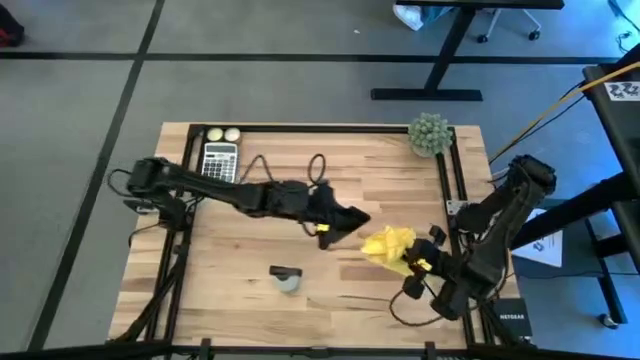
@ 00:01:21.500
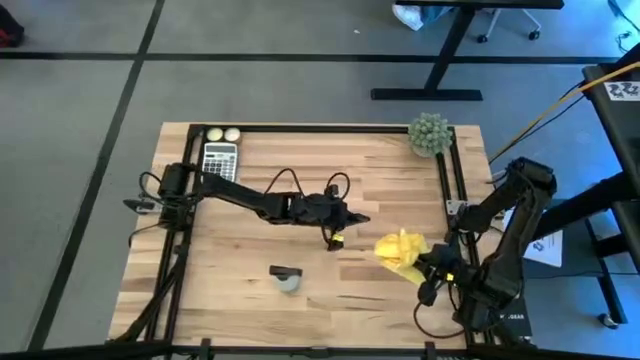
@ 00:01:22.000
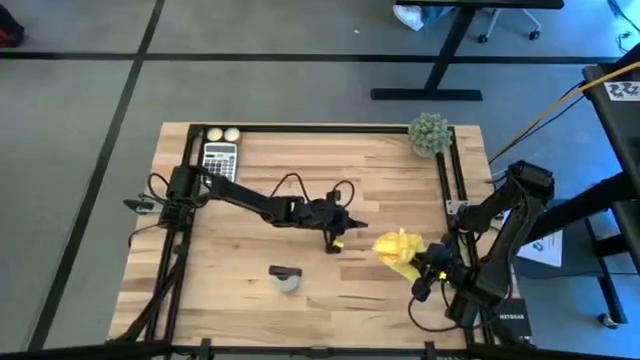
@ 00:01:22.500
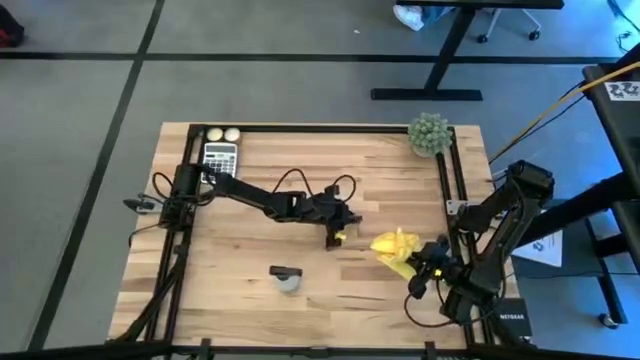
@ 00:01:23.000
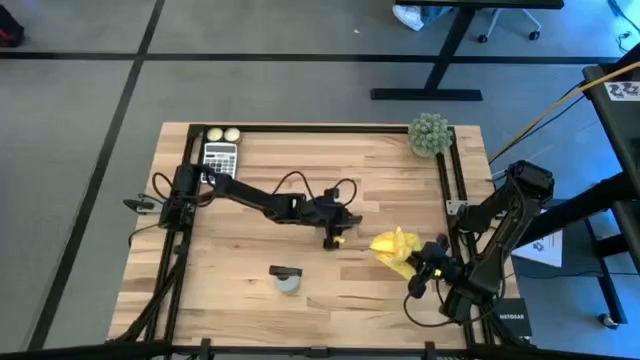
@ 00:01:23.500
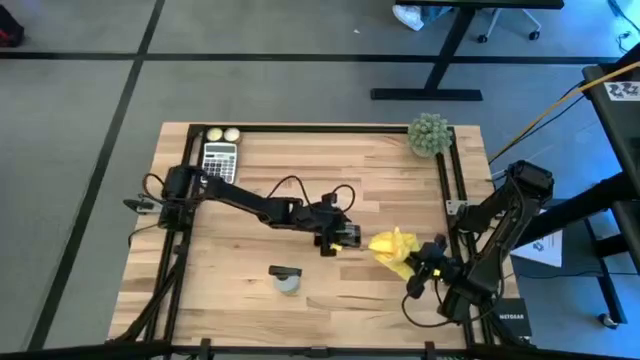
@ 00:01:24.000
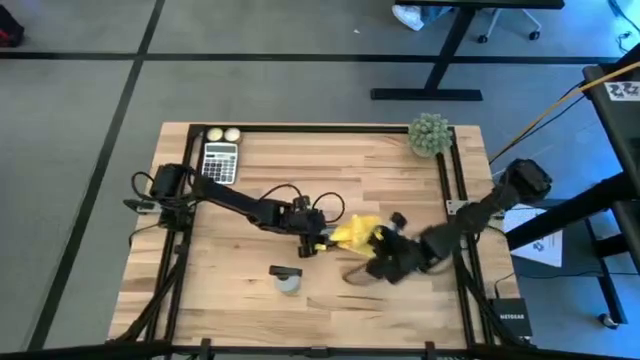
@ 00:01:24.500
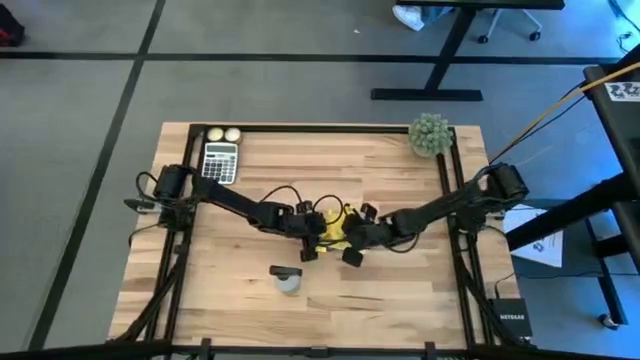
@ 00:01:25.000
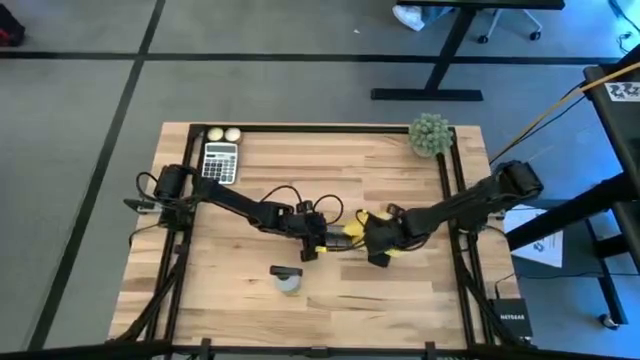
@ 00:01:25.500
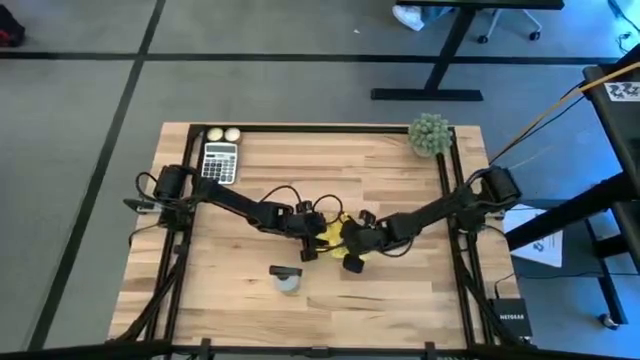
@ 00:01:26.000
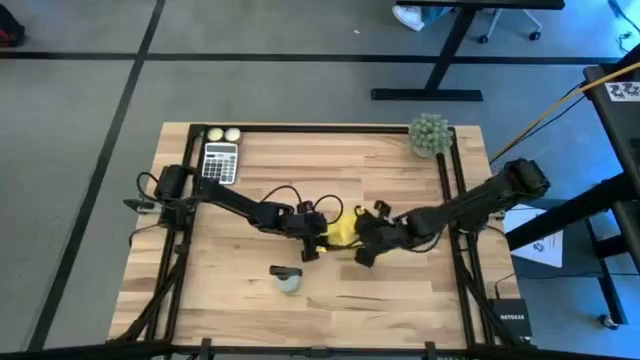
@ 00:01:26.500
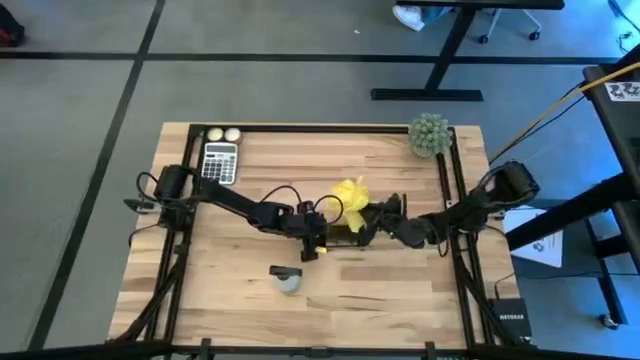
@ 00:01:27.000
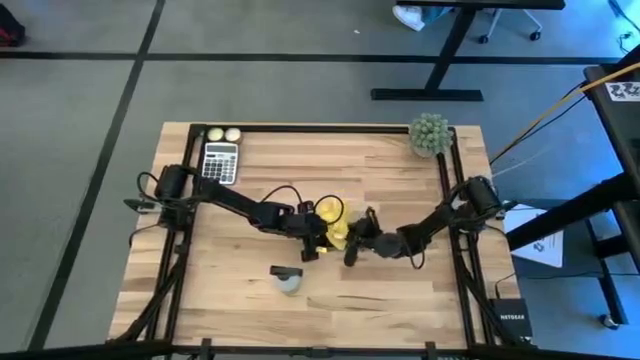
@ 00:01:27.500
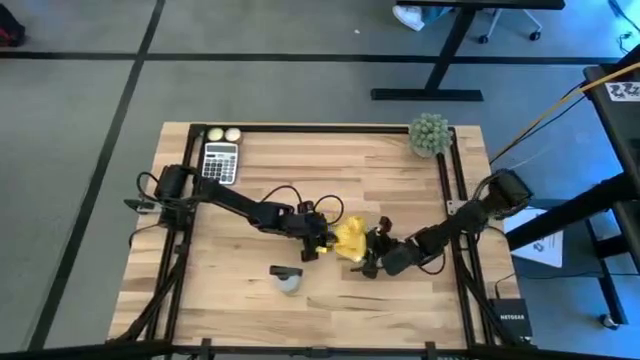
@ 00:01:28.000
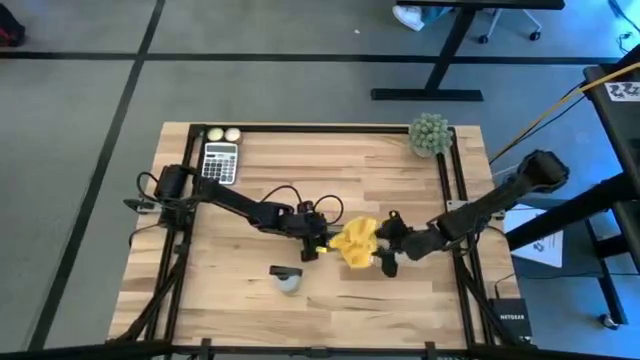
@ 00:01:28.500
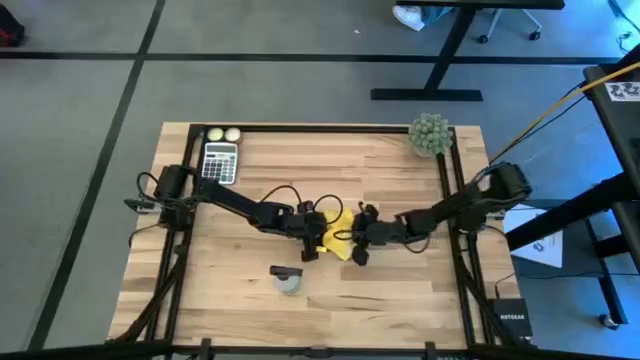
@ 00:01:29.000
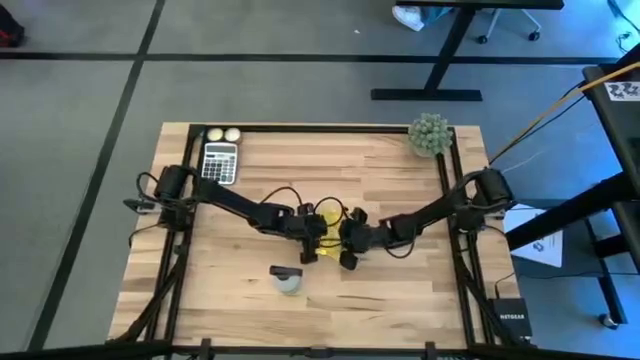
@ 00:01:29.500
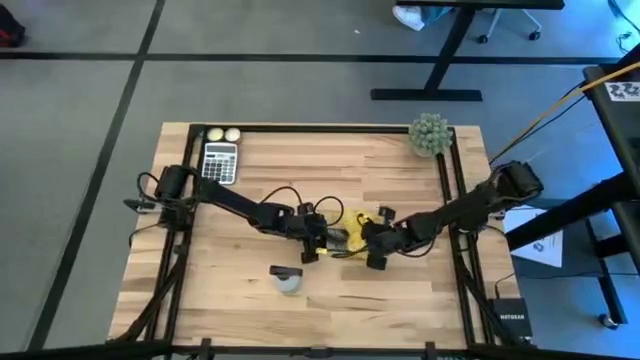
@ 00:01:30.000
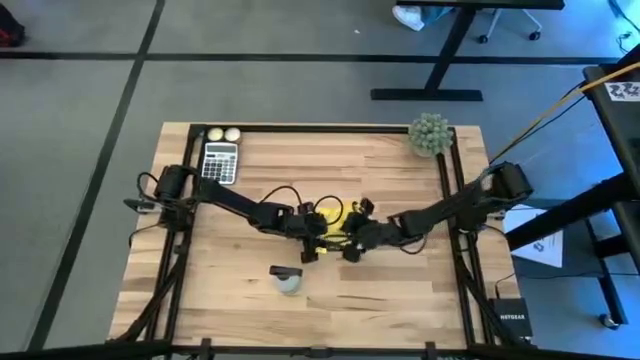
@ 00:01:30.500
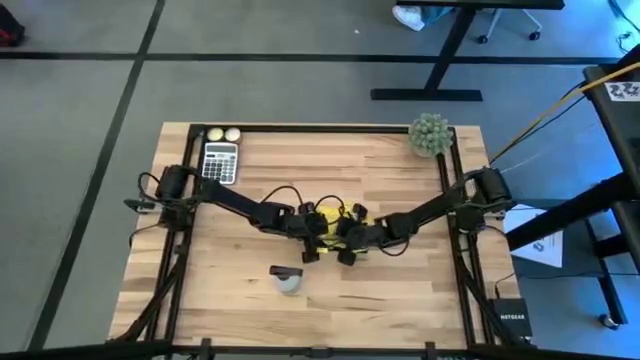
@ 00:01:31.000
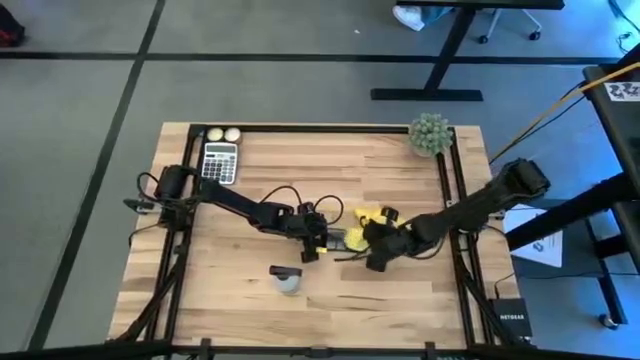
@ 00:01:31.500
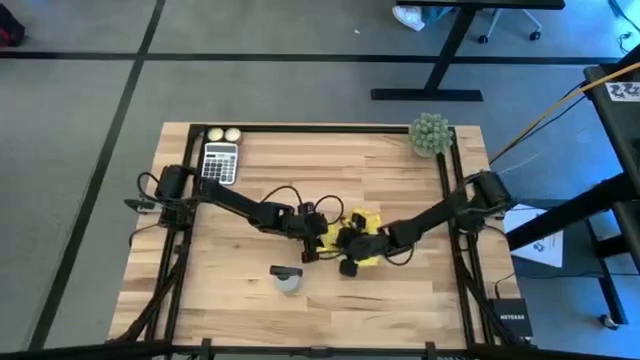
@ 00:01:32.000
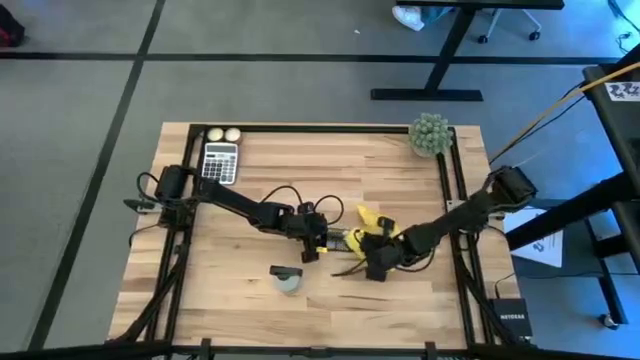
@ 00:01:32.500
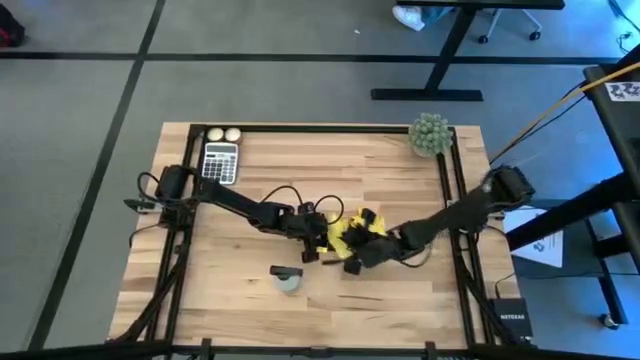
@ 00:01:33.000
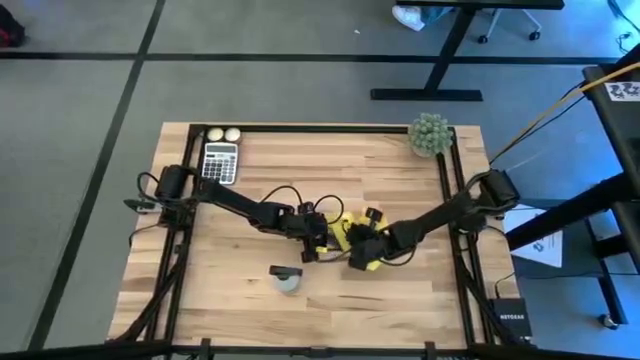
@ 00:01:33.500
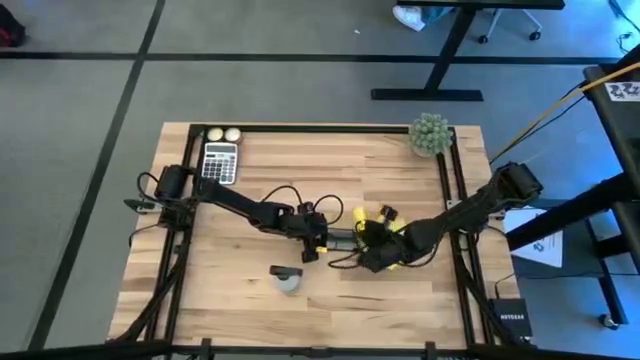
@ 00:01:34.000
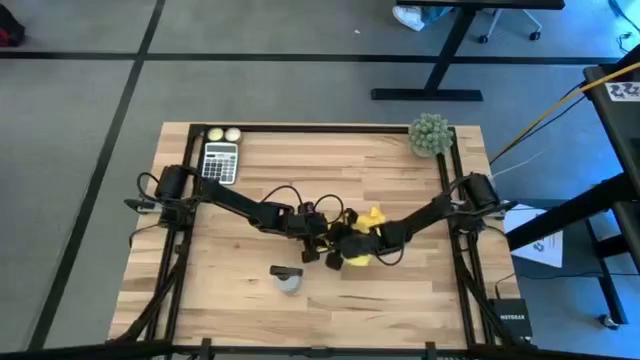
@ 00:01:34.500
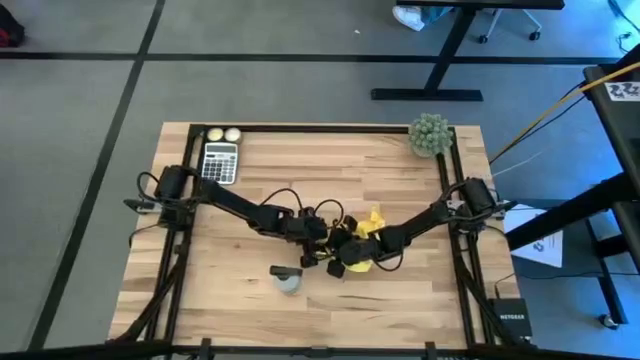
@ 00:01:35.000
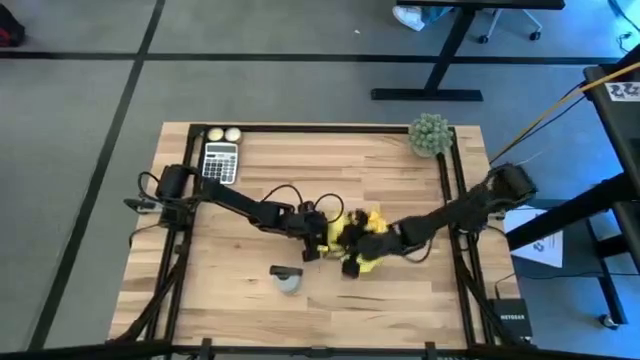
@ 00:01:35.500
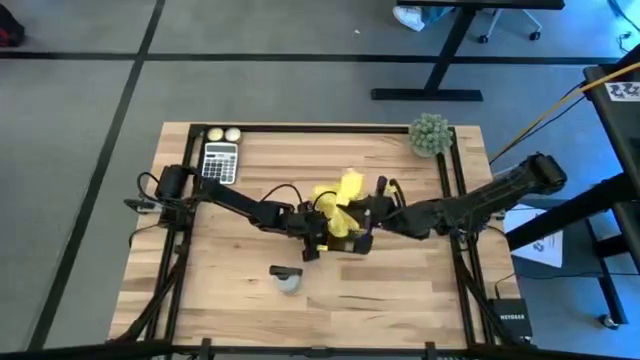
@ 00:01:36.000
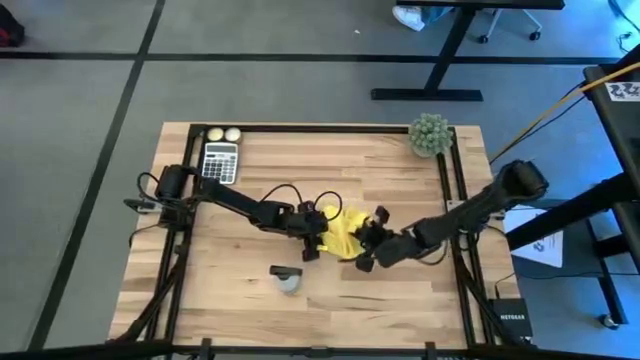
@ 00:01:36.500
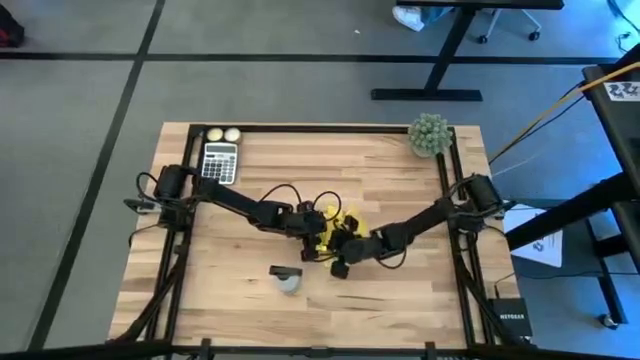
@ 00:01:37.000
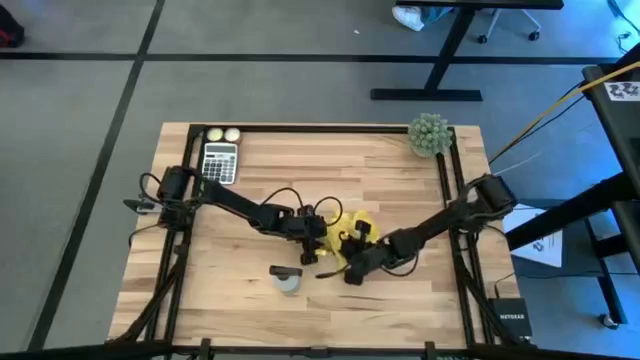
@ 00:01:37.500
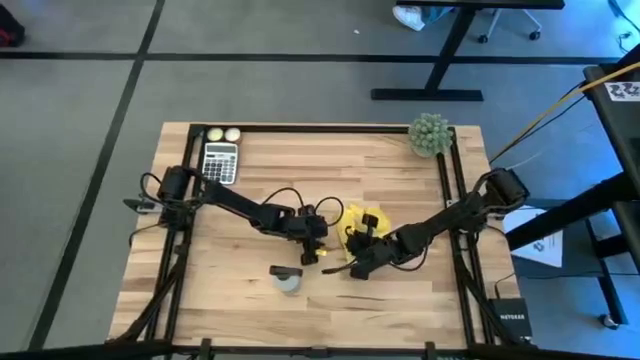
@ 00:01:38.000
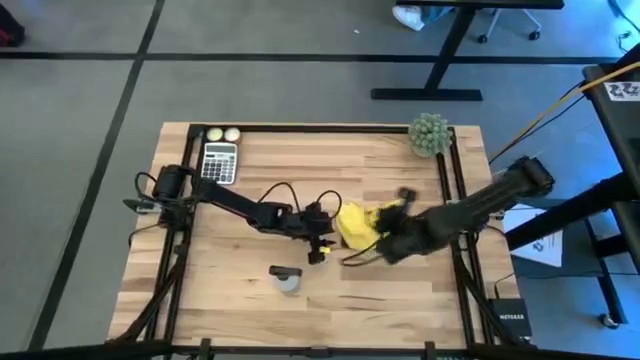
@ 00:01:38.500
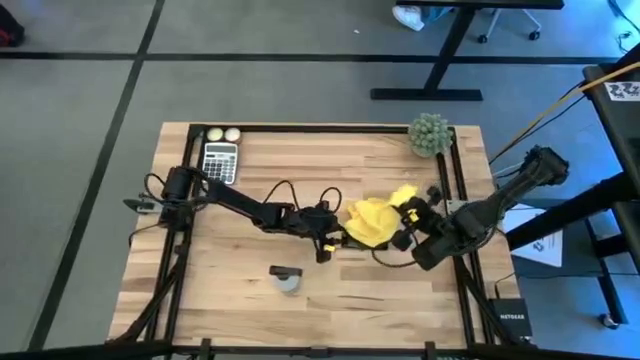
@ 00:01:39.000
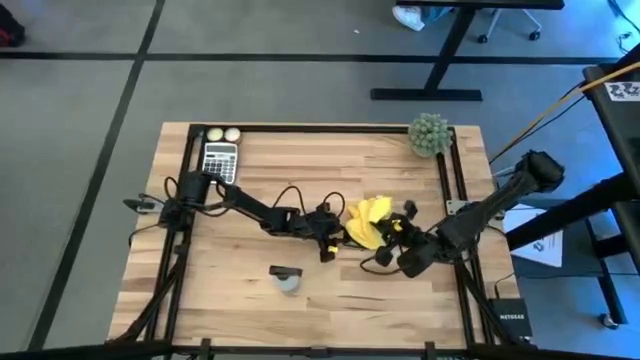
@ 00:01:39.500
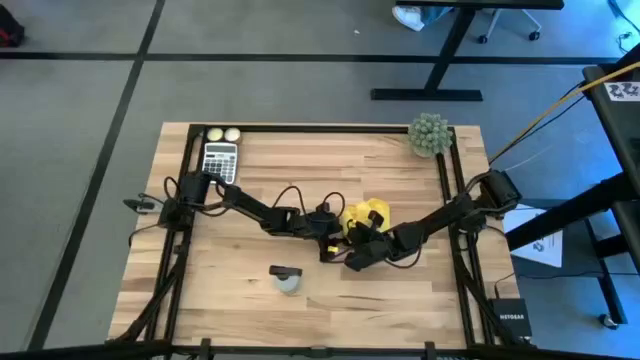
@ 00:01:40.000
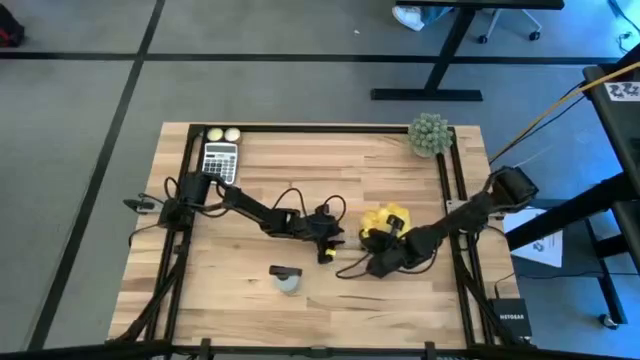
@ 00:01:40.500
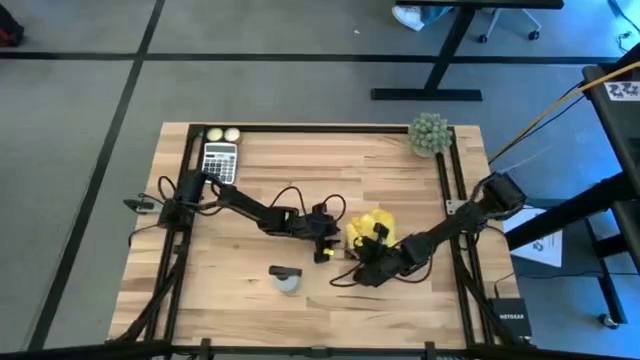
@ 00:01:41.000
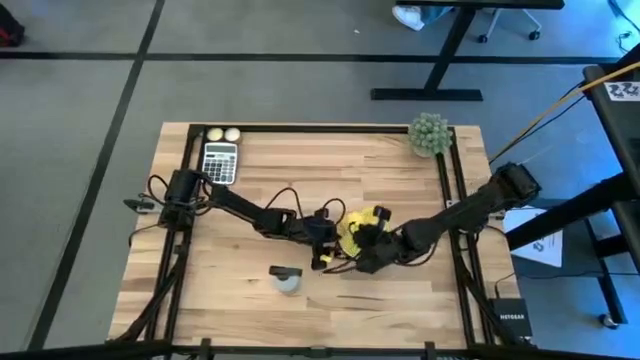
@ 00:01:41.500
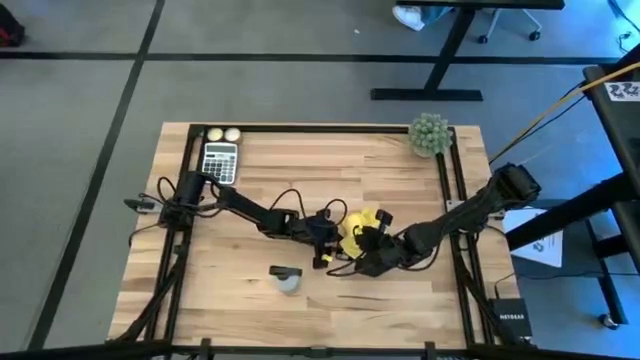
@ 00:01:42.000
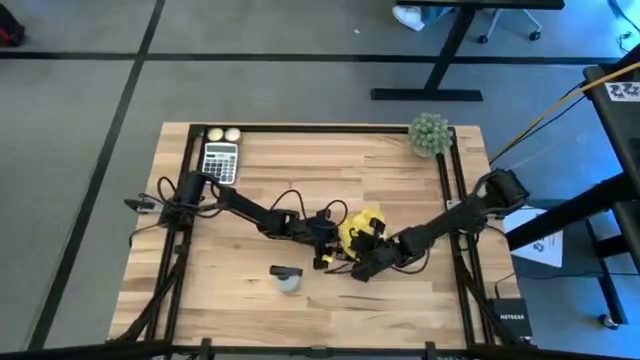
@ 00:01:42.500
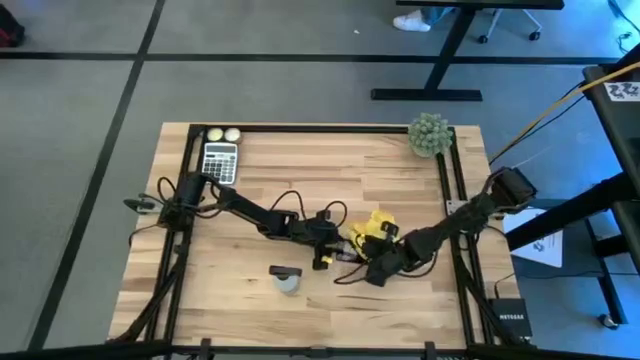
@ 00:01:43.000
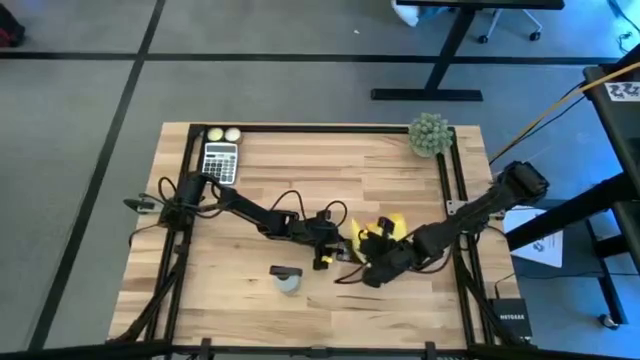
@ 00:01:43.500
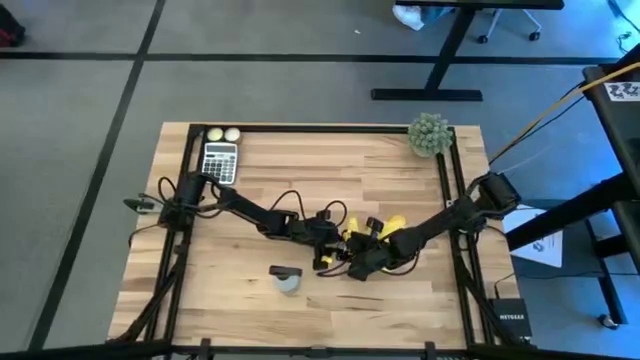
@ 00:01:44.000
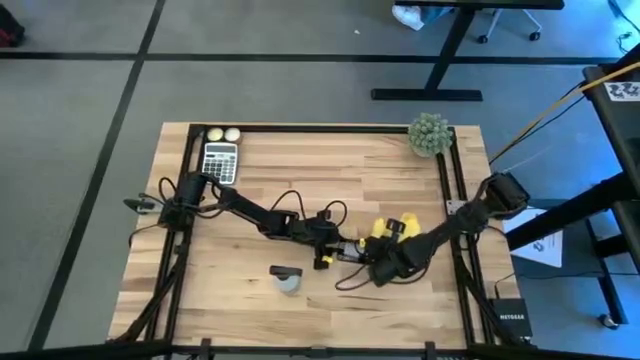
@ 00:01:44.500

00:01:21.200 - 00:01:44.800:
Task: Apply microfiber cloth
Wipe the front of the black cellphone with yellow microfiber cloth
